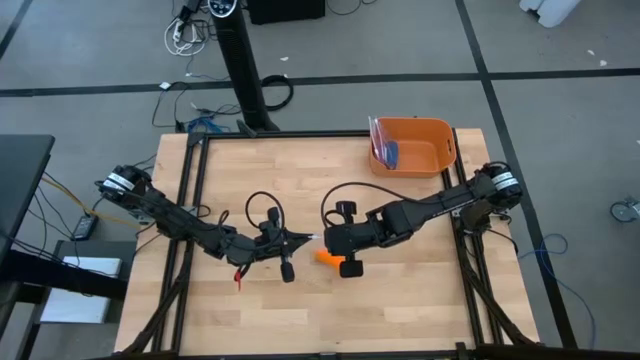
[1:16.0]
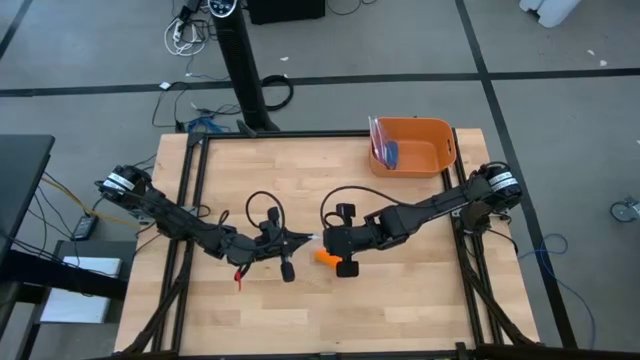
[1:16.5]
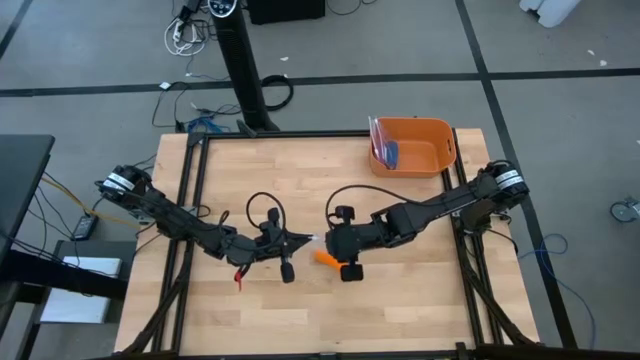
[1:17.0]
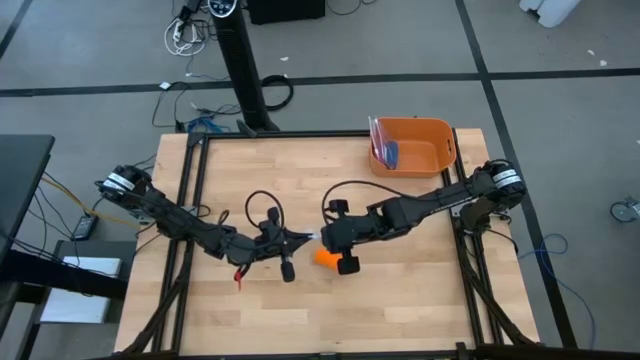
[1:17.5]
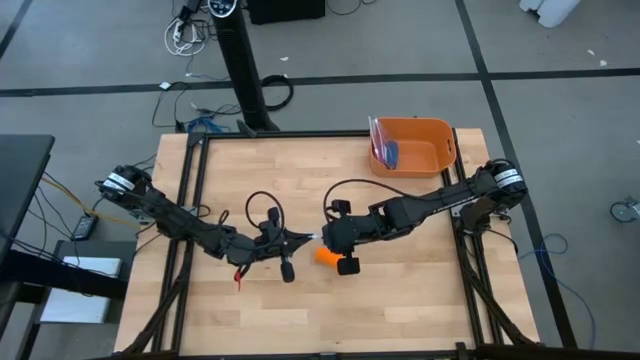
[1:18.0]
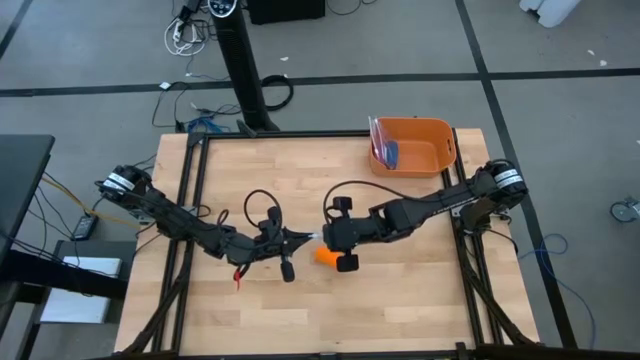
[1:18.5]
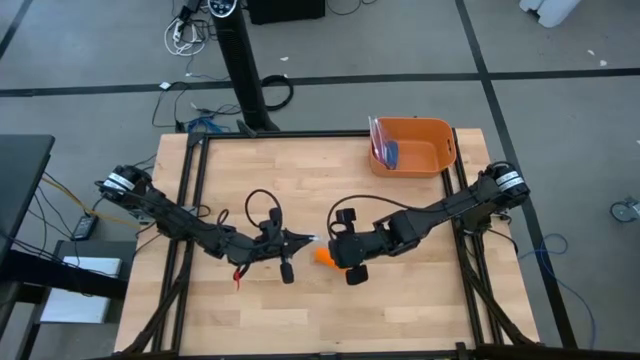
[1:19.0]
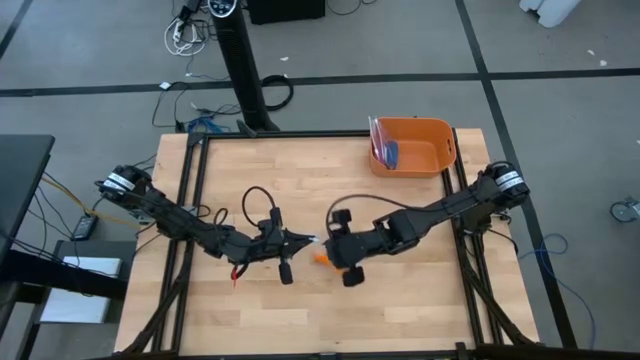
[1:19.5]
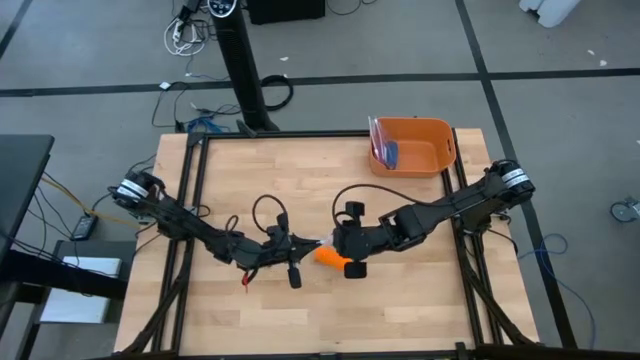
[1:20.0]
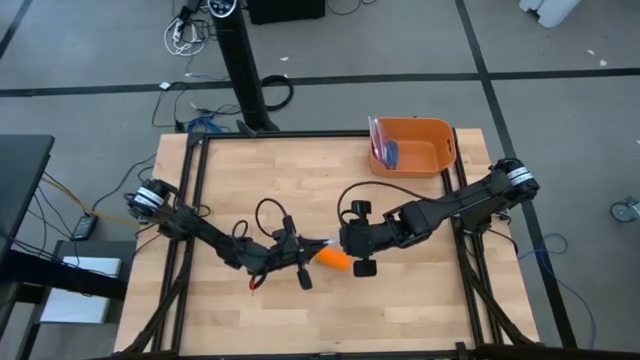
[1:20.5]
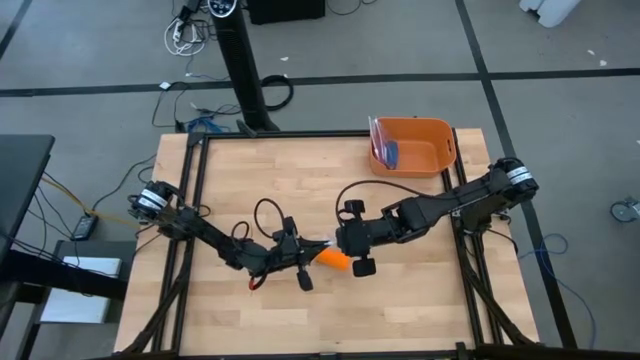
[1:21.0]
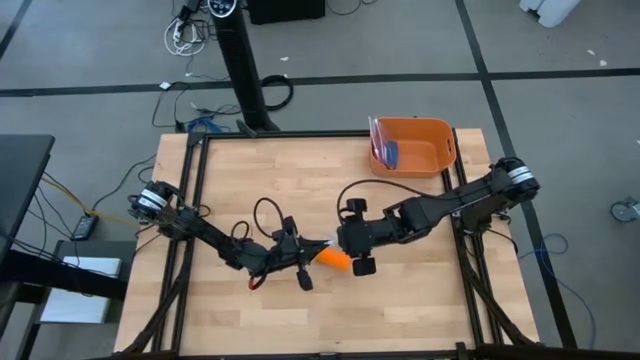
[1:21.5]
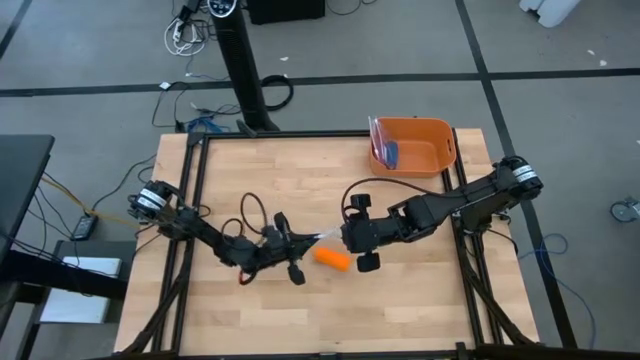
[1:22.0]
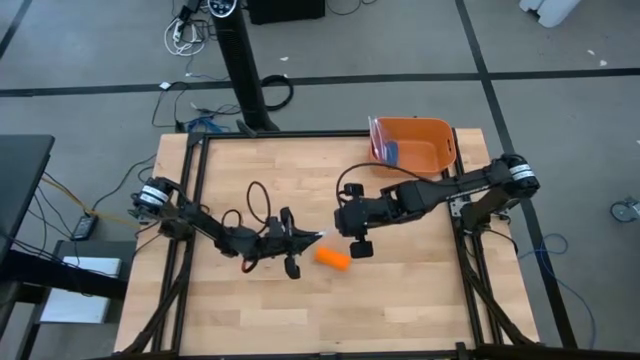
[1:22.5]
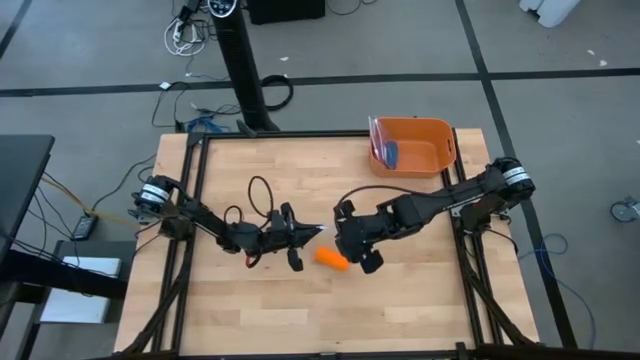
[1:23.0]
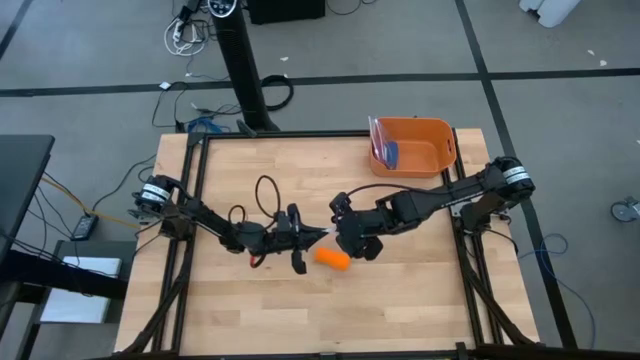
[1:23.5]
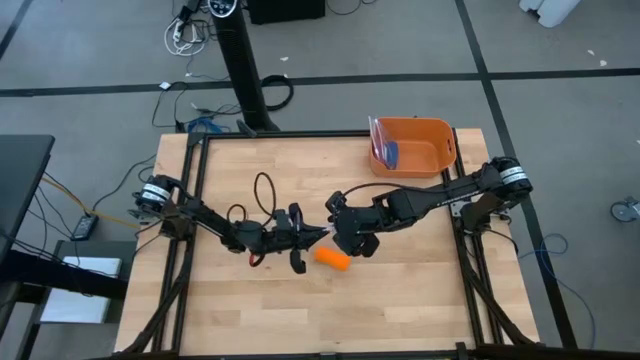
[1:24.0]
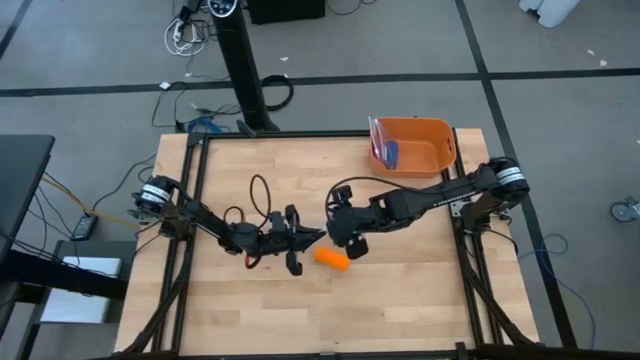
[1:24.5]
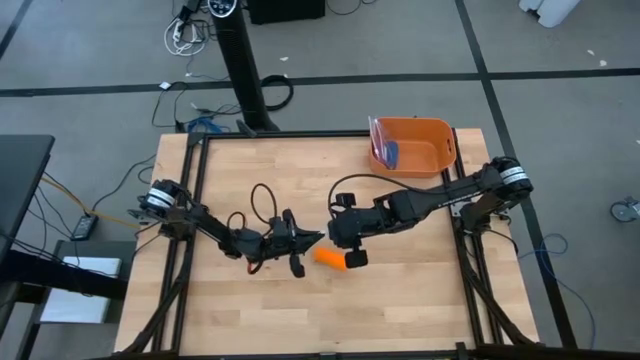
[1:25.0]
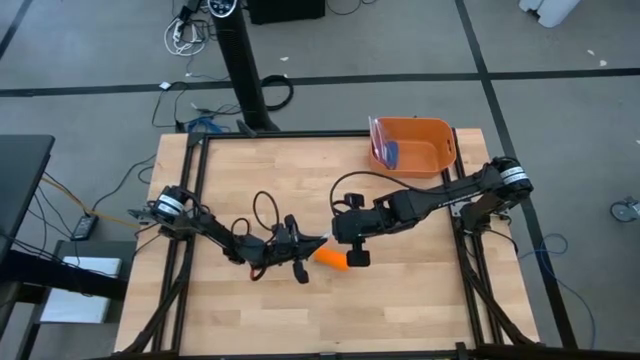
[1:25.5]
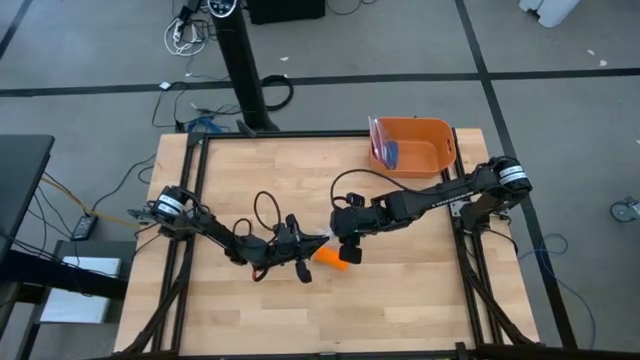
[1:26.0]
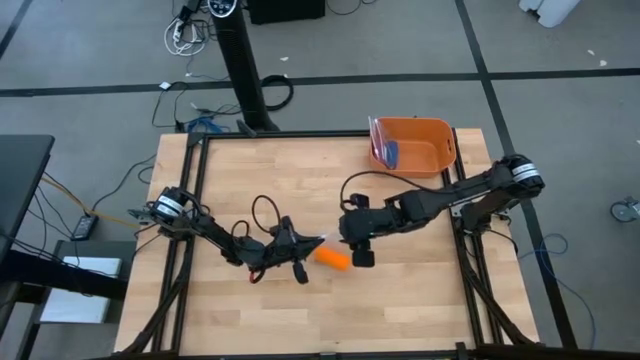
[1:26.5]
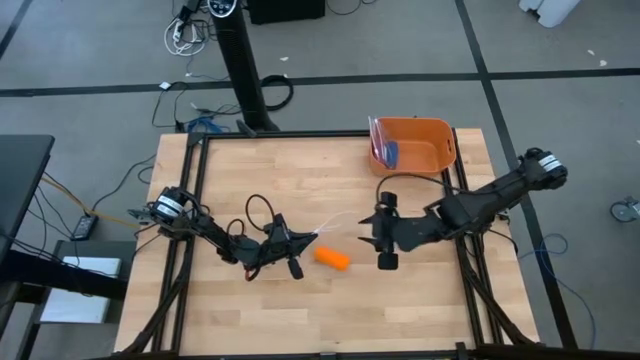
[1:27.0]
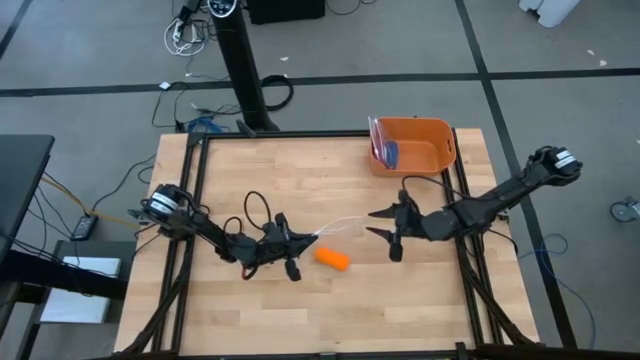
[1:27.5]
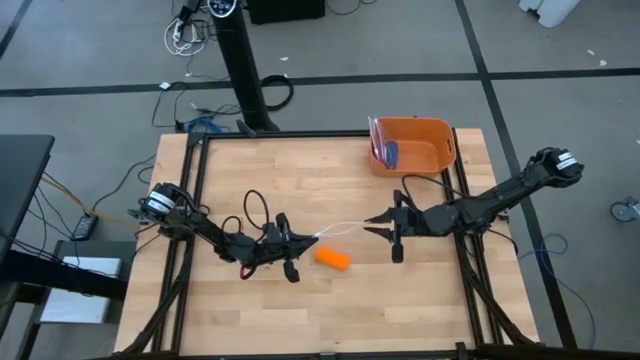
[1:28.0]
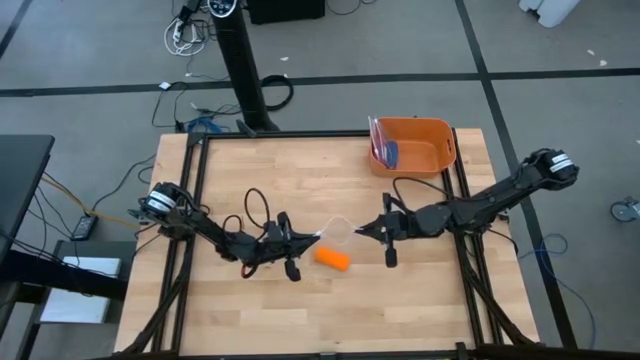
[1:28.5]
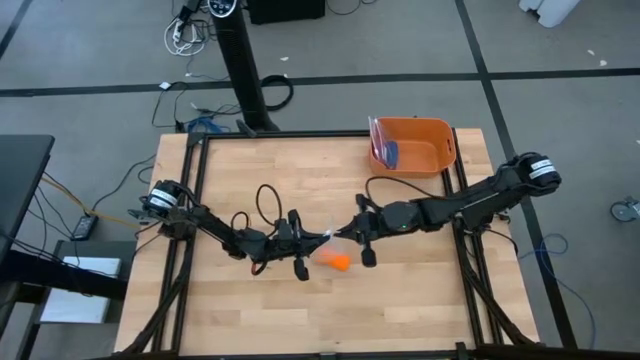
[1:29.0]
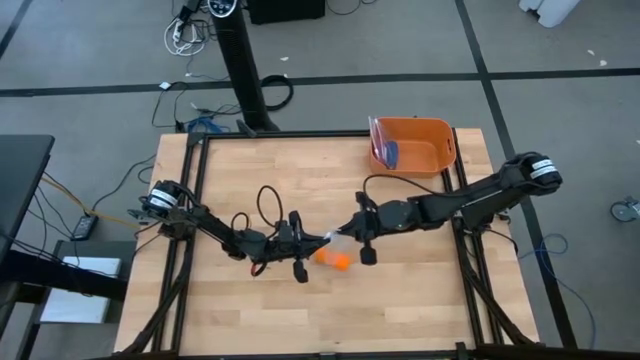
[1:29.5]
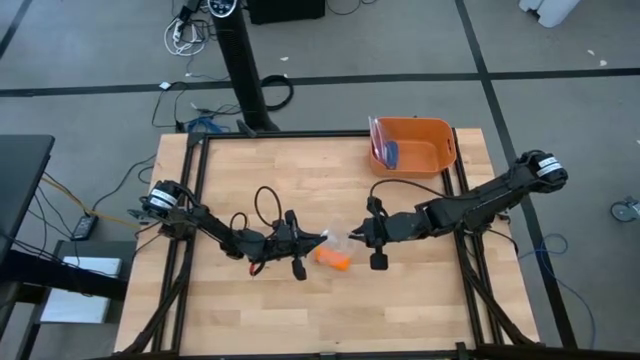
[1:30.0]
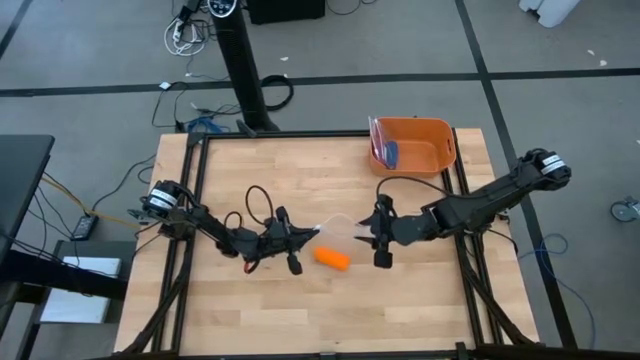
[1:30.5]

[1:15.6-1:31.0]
Task: Roll bandage
Prepare the transparent zip bag

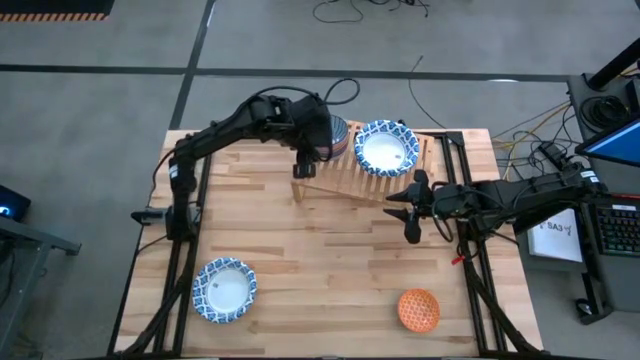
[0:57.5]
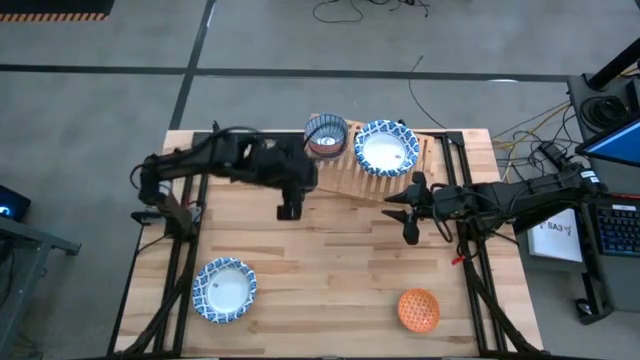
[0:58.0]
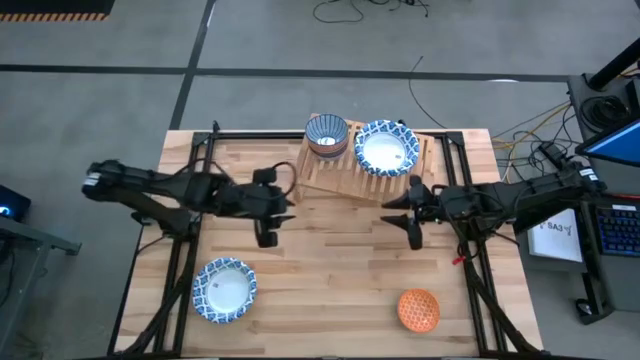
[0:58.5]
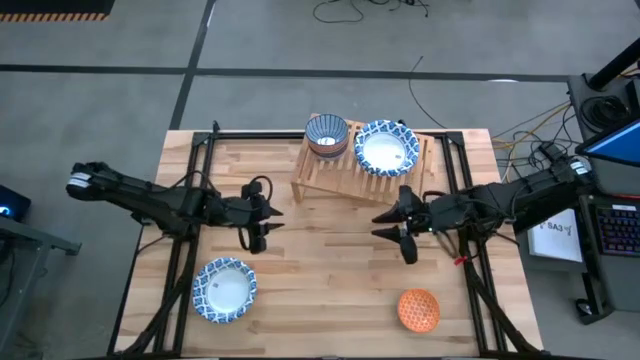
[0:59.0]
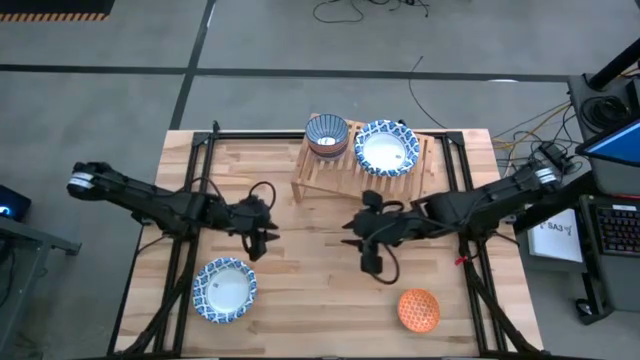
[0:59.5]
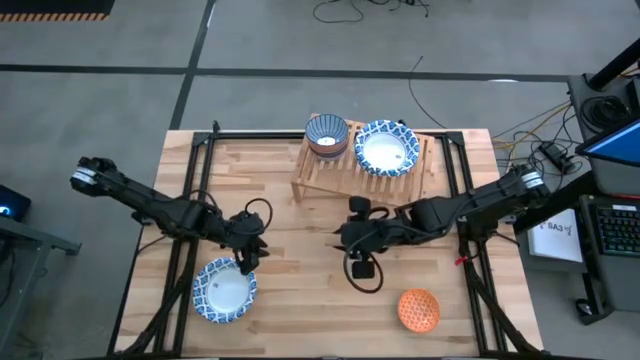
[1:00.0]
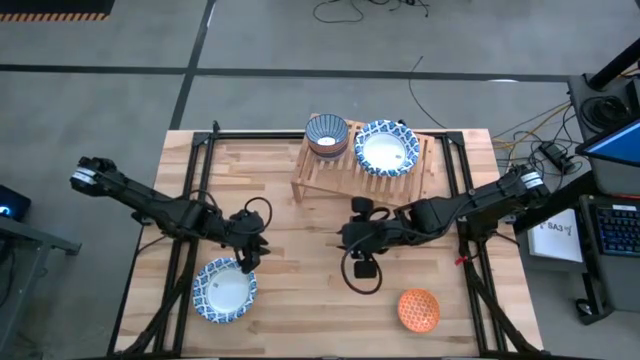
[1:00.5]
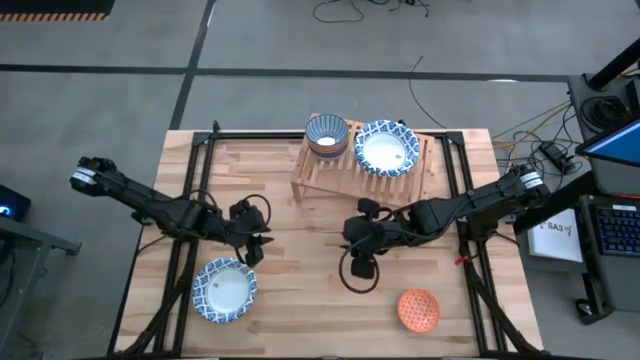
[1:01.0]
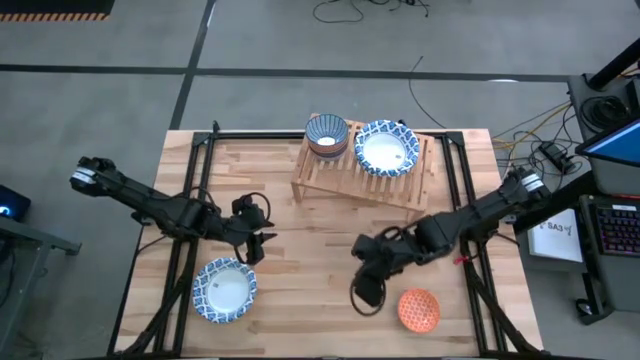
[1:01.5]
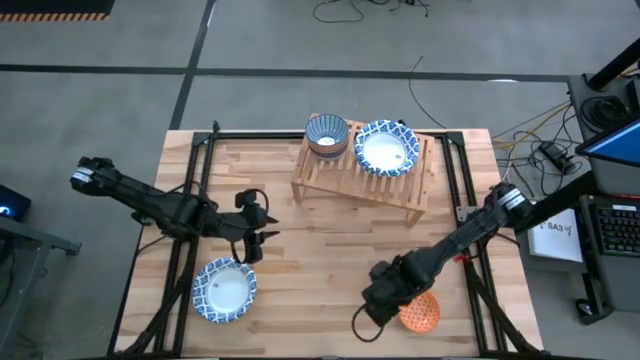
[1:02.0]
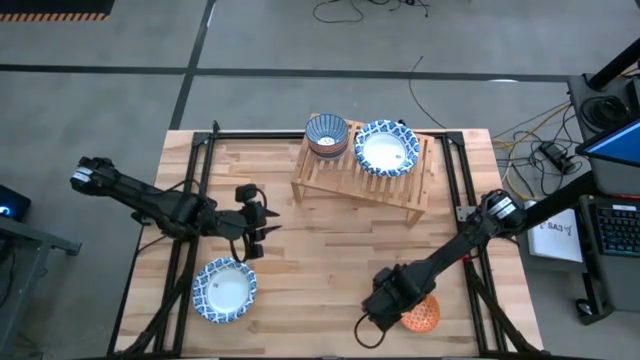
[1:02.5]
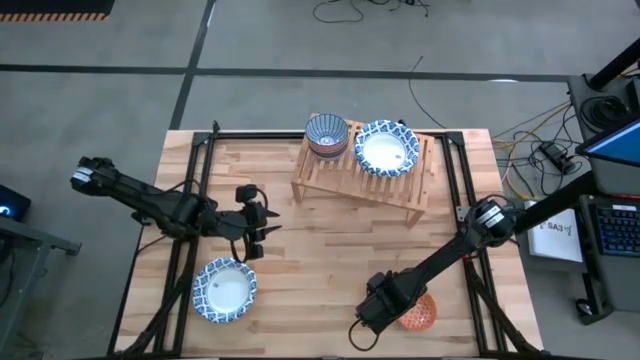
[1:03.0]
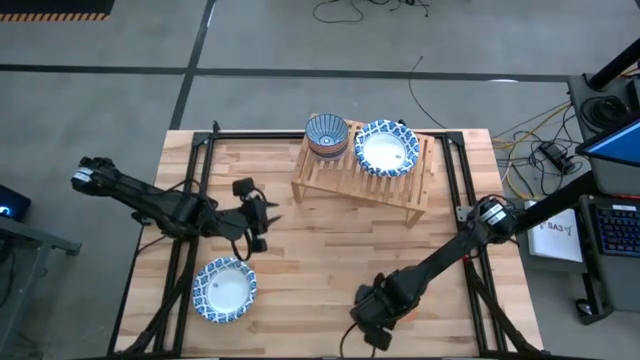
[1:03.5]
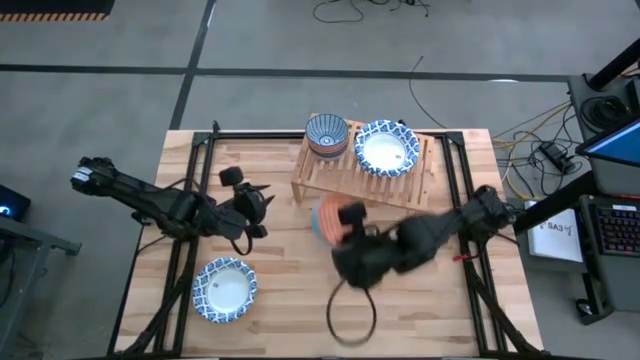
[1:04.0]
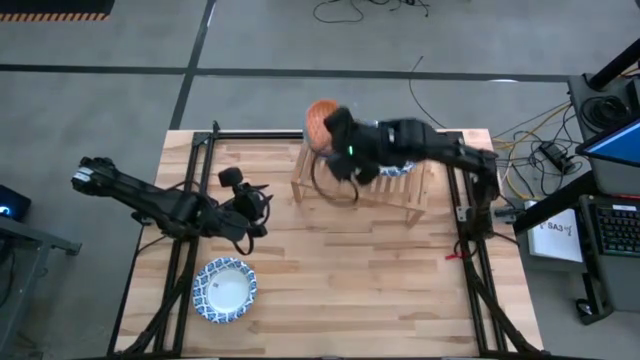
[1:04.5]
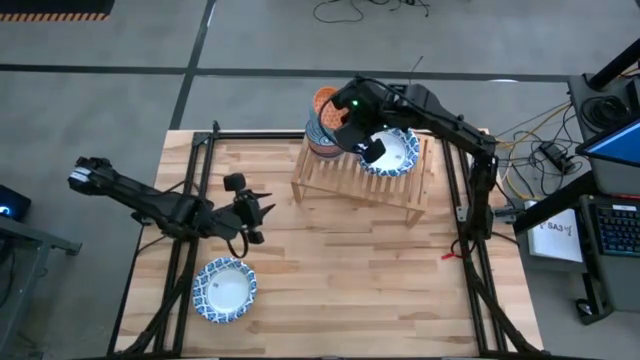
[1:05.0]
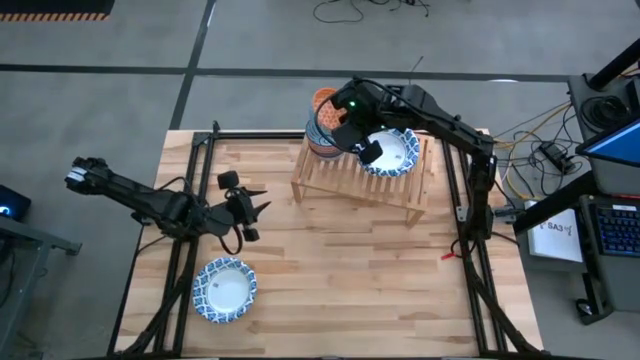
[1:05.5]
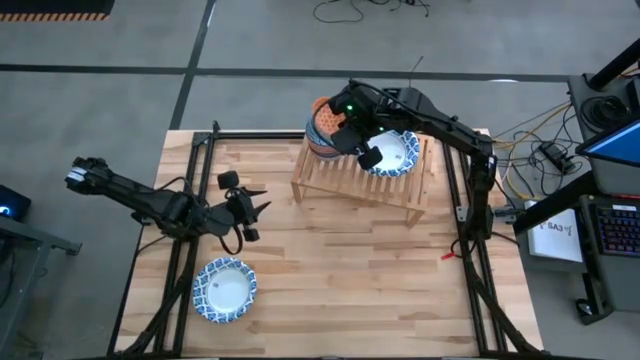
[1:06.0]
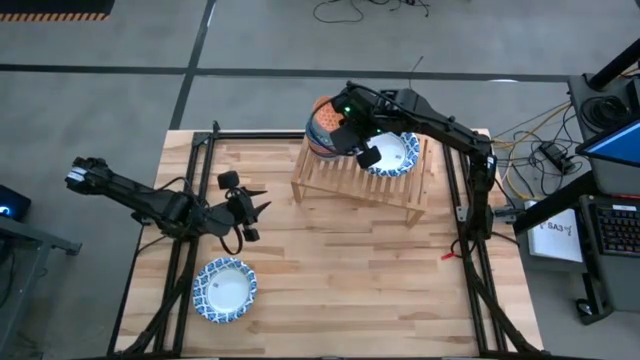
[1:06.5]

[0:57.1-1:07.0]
Task: Place and stack bowls onto a shelf
Stack the orange pattern bowl on top of the blue pattern bowl
